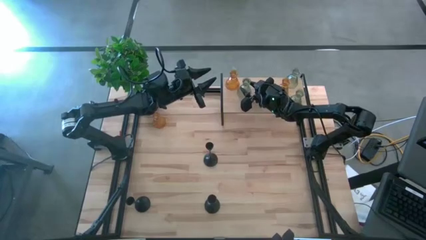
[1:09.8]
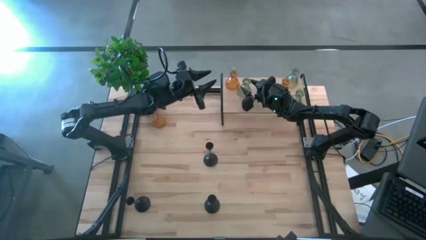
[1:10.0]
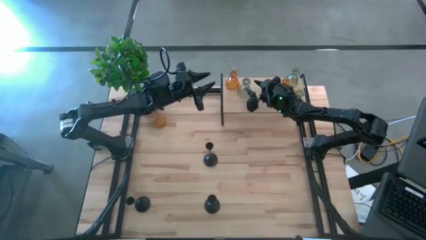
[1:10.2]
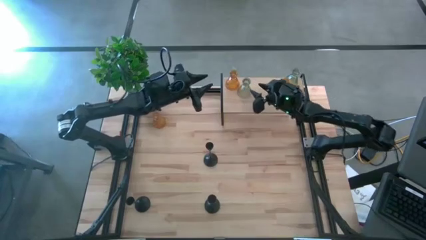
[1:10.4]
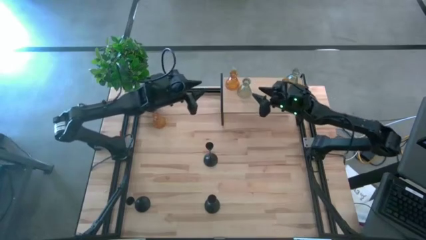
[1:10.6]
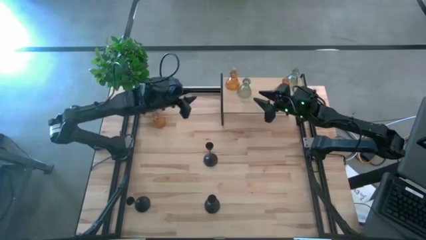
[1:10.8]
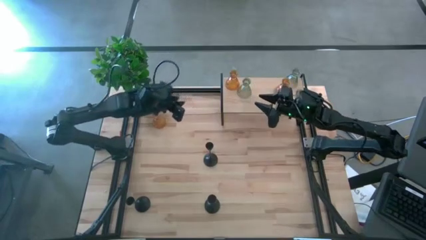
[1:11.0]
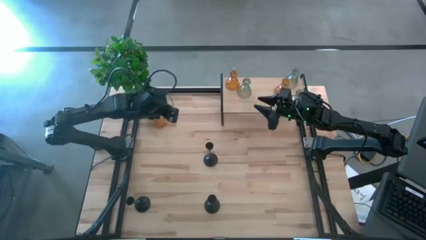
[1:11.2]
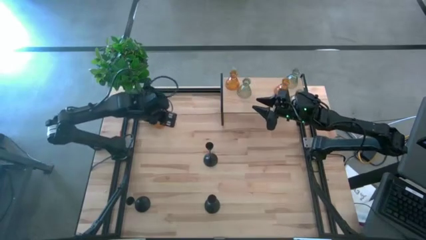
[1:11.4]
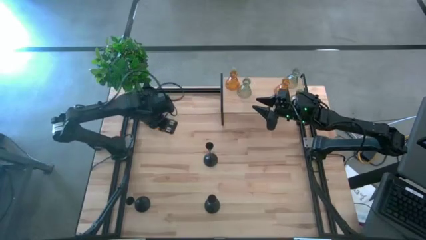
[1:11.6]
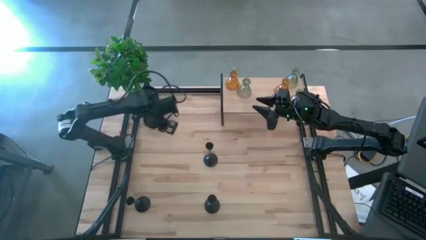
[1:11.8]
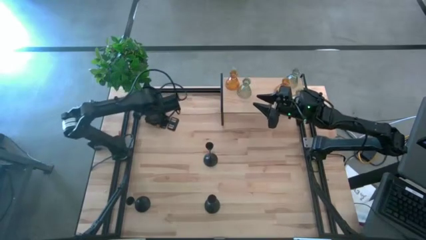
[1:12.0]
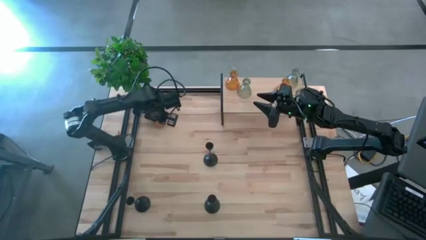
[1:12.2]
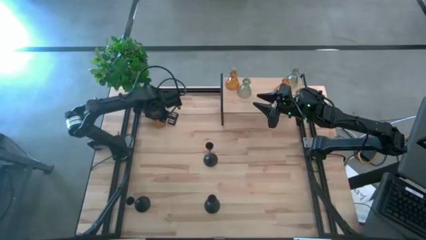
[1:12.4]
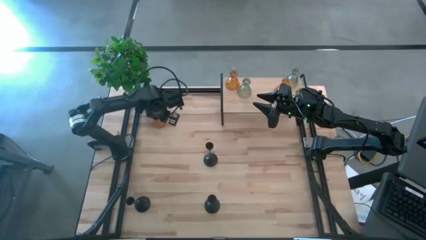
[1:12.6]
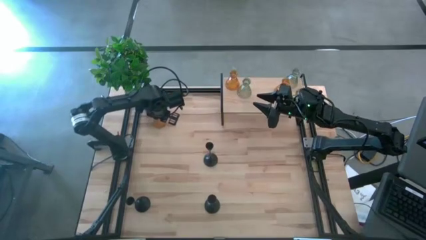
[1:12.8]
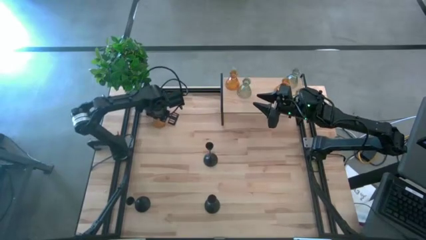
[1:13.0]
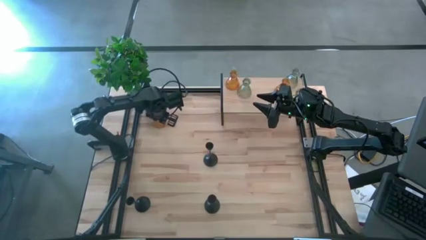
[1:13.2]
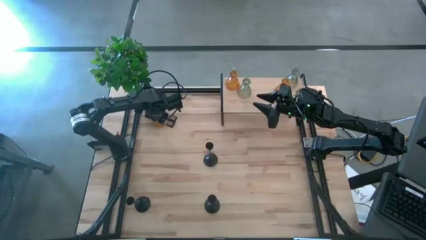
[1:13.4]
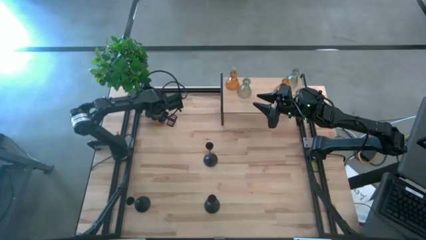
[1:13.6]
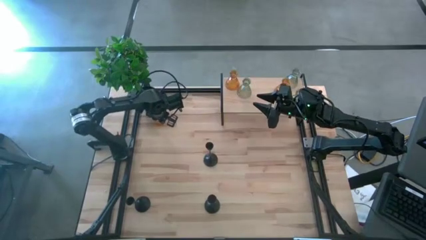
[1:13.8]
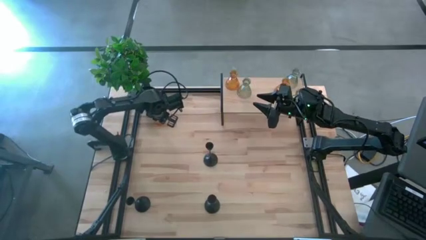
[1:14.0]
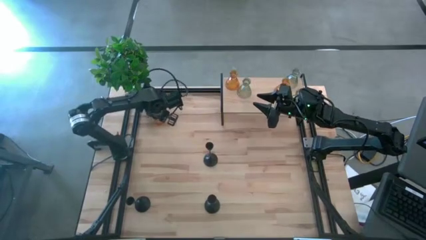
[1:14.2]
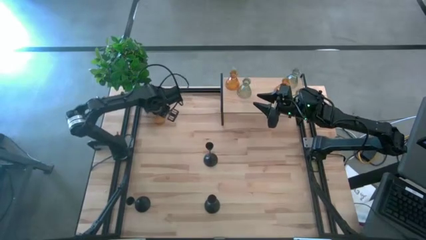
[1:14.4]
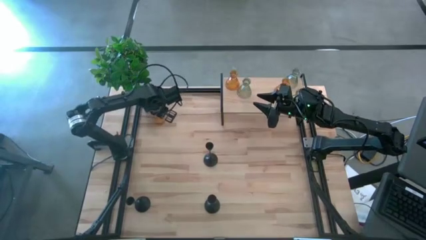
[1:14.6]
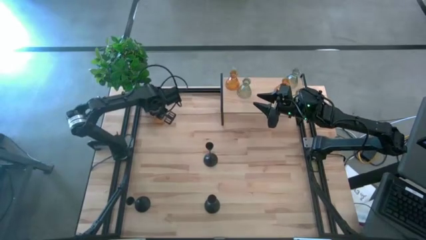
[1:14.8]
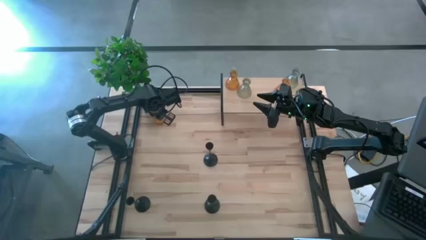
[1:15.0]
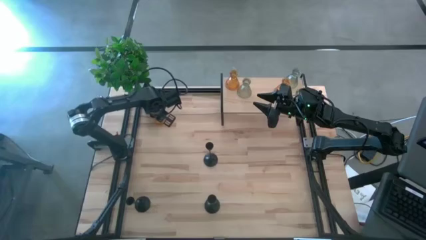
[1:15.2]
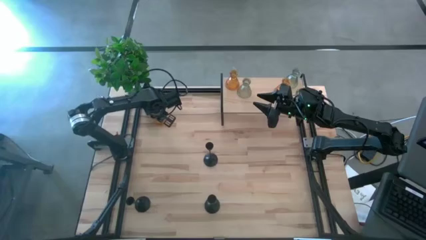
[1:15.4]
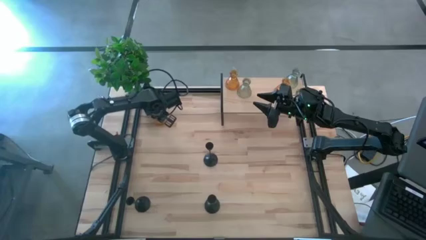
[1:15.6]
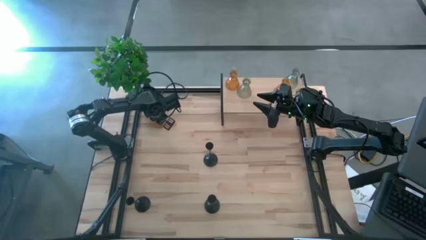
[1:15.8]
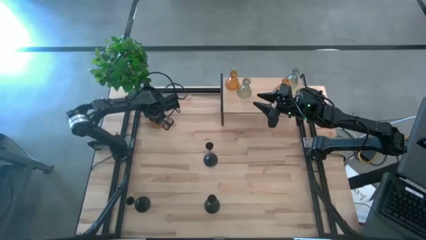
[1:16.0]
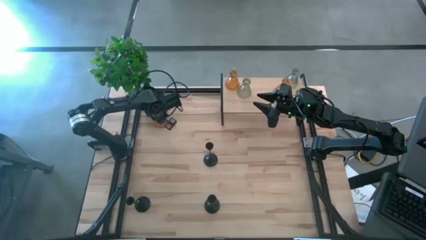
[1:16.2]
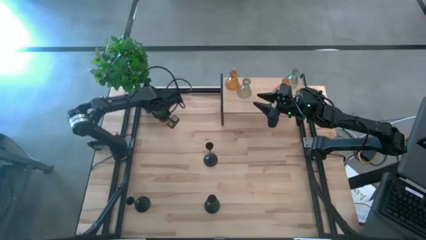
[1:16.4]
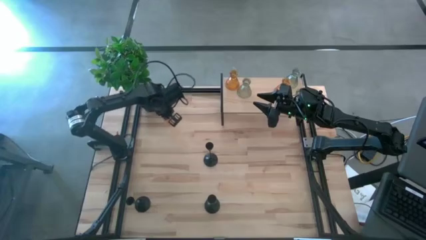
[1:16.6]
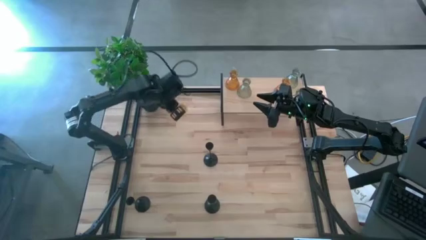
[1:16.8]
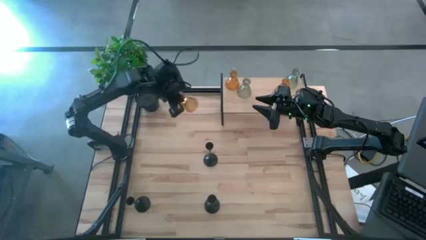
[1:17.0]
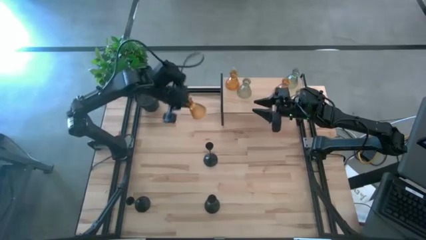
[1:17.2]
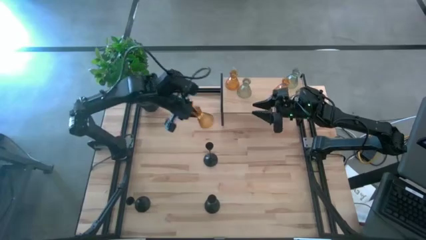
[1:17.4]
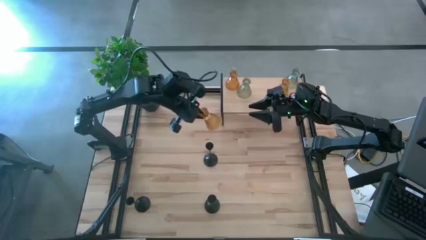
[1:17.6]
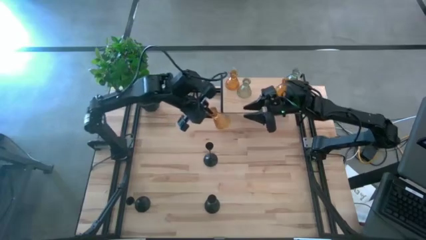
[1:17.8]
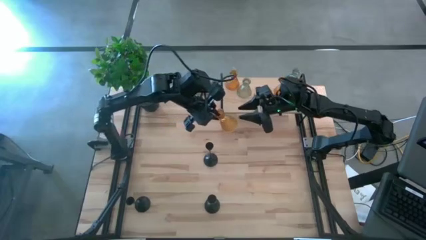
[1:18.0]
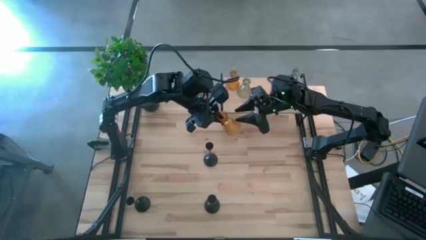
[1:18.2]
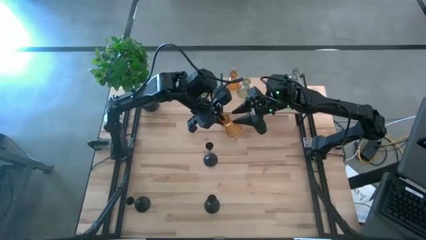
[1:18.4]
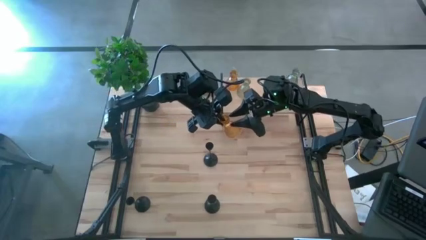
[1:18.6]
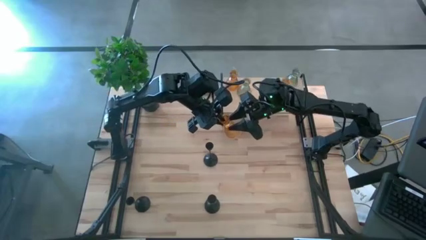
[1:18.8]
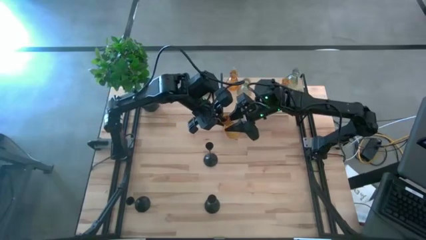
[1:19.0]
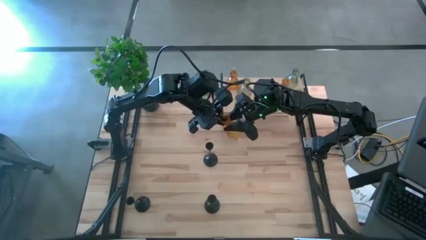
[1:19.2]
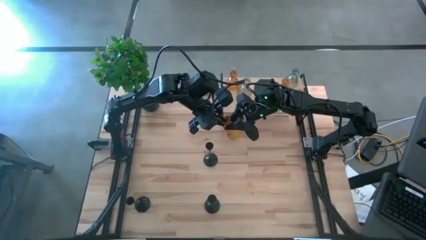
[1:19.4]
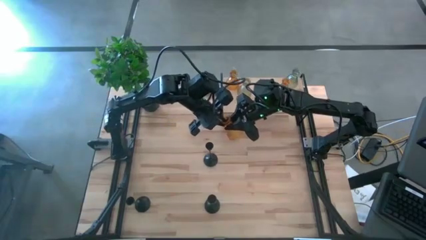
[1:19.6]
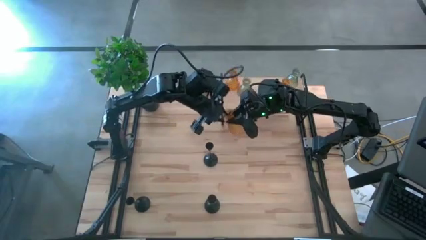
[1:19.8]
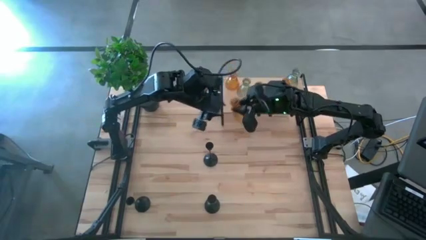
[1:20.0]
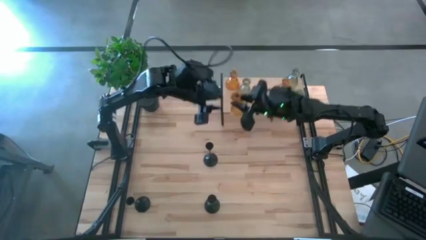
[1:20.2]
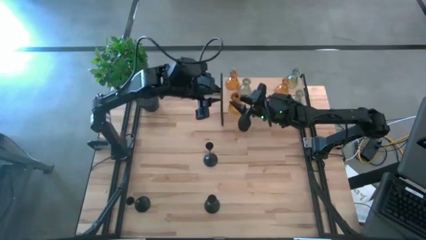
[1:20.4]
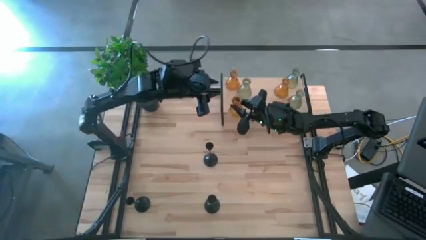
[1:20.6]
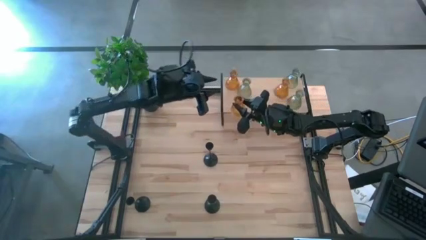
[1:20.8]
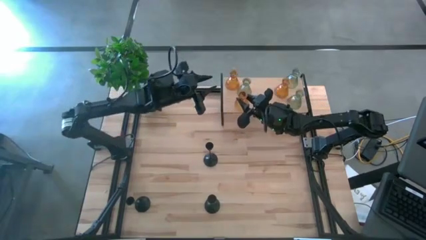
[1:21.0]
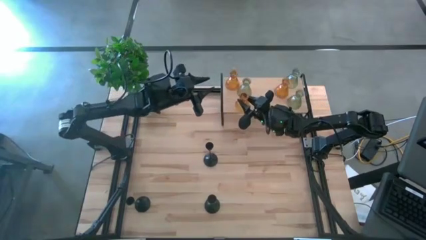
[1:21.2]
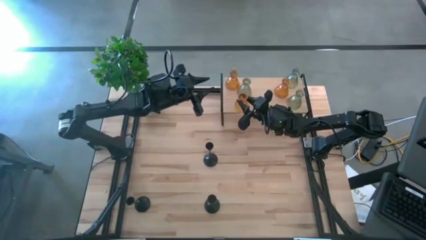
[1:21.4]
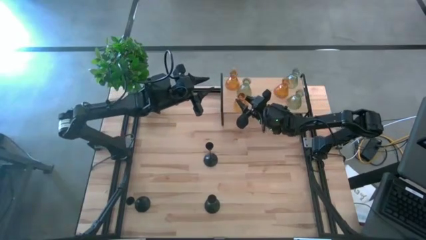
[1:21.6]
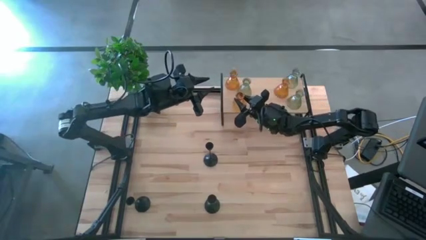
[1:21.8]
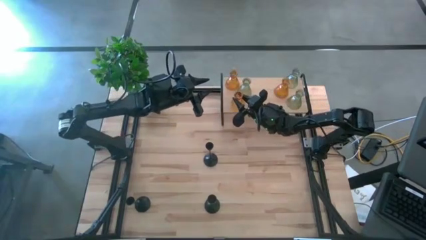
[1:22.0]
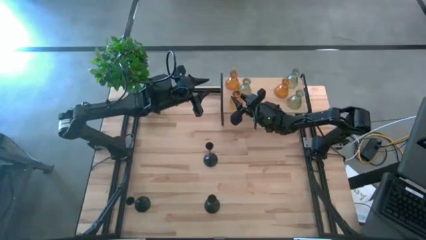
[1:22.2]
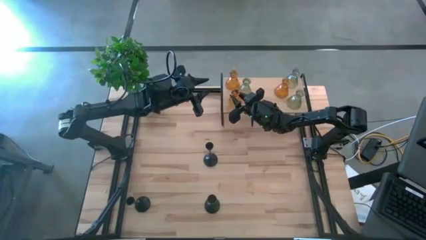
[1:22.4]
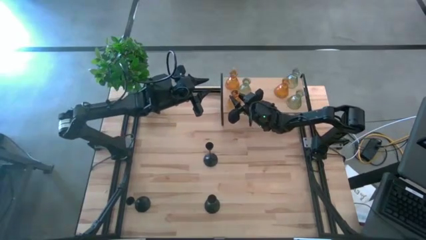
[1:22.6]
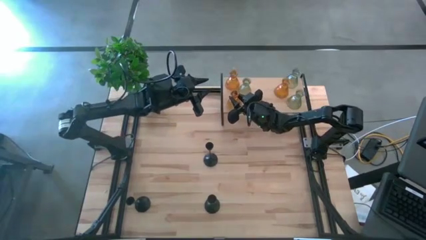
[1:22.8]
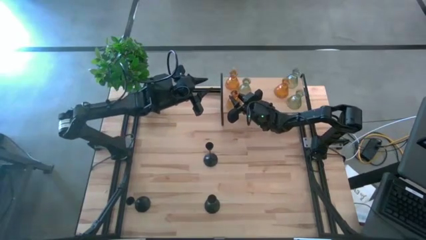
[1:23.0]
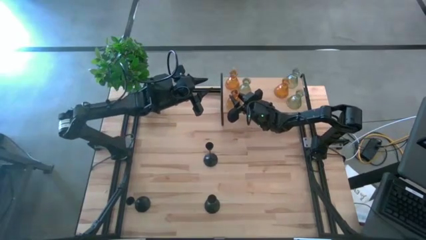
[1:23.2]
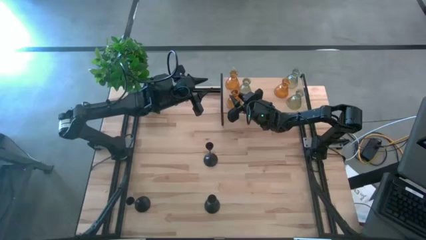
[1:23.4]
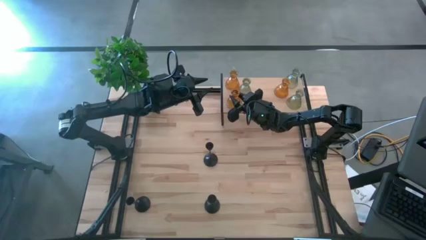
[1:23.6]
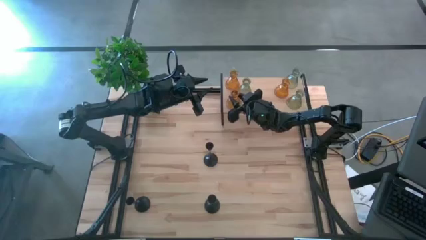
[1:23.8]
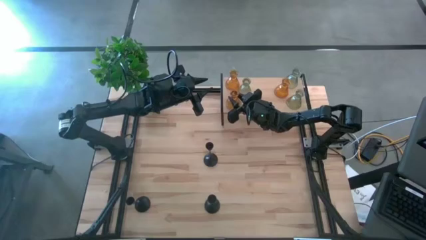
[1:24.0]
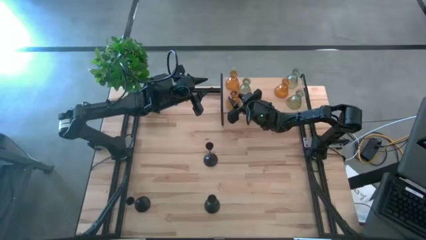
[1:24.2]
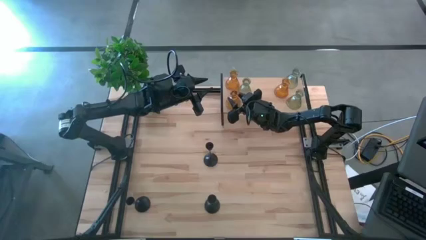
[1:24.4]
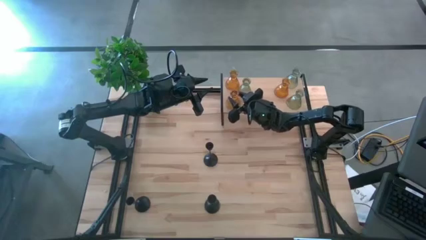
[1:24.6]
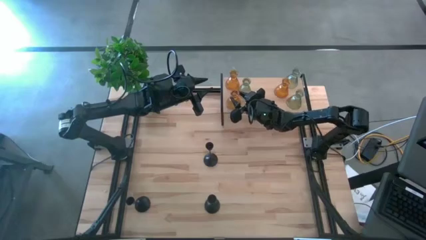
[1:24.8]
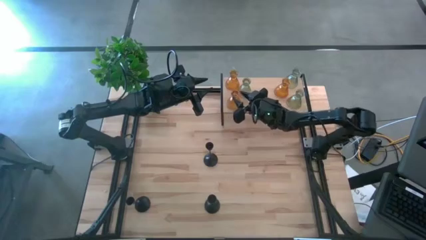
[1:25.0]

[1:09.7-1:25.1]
Task: Pick & Place candle stick holders
Put the orange glass candle holder on the shelf
